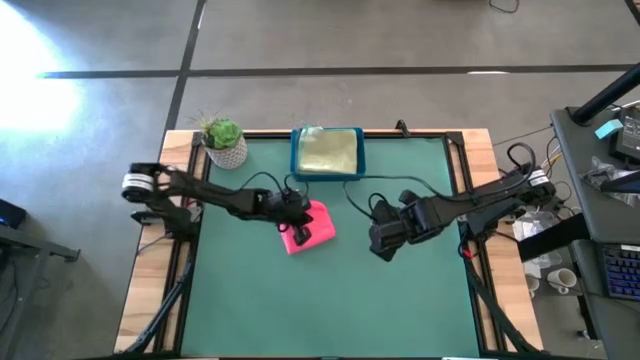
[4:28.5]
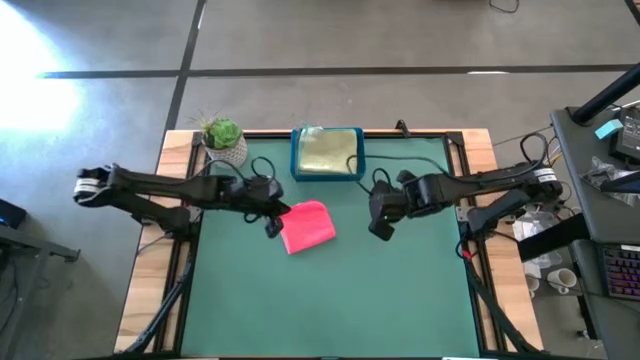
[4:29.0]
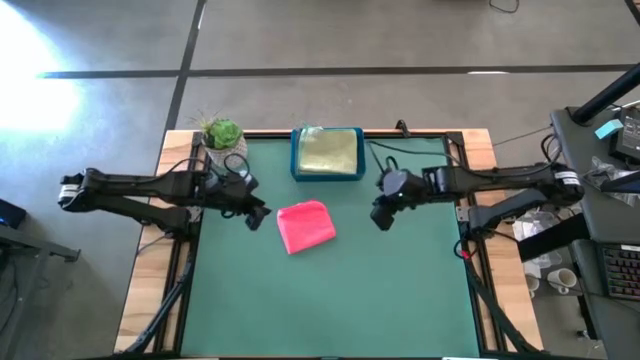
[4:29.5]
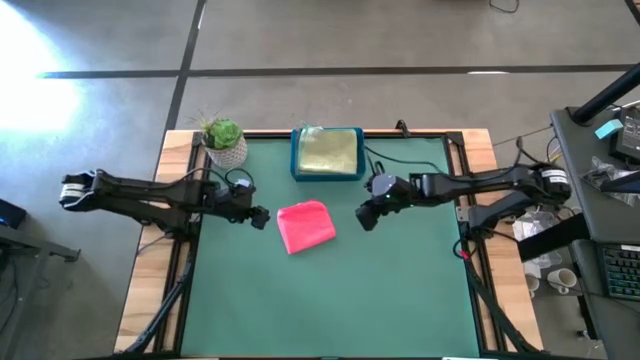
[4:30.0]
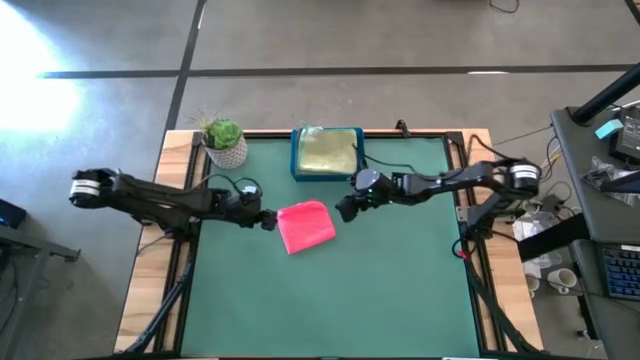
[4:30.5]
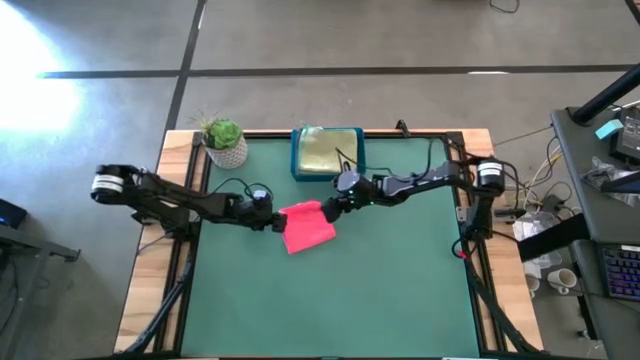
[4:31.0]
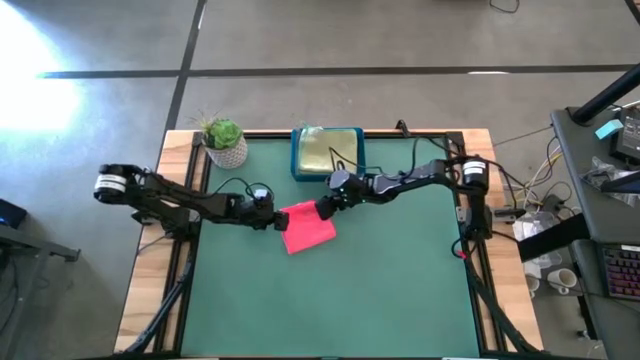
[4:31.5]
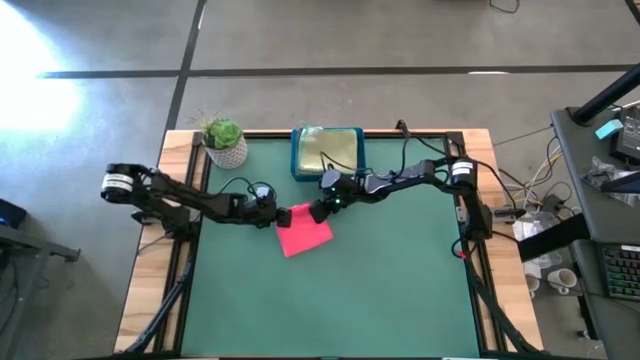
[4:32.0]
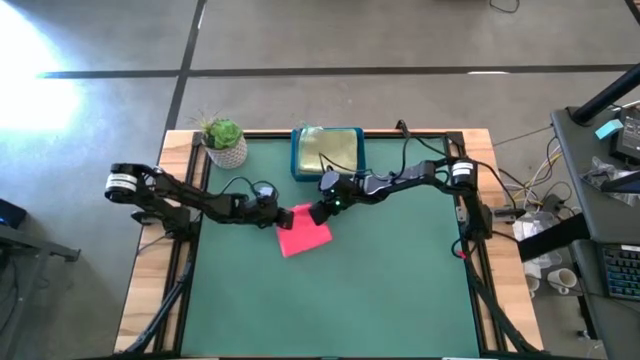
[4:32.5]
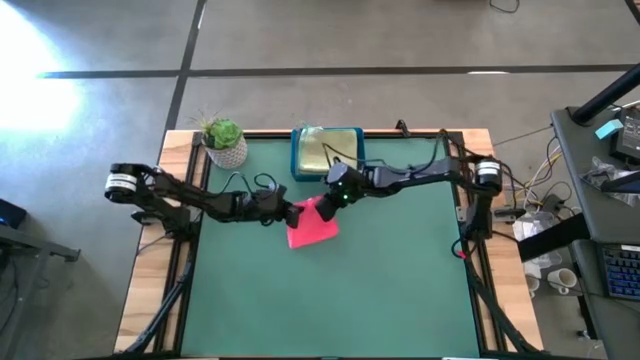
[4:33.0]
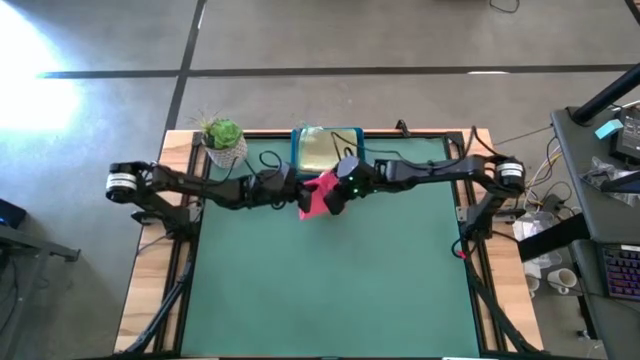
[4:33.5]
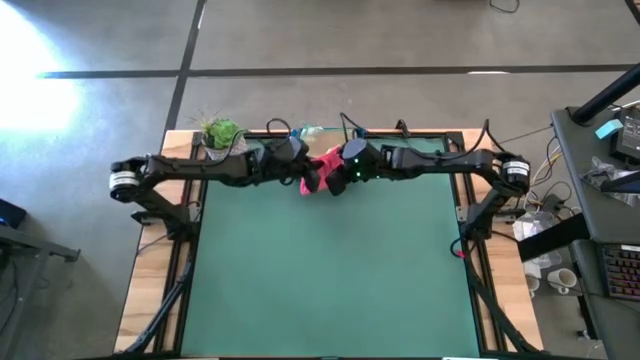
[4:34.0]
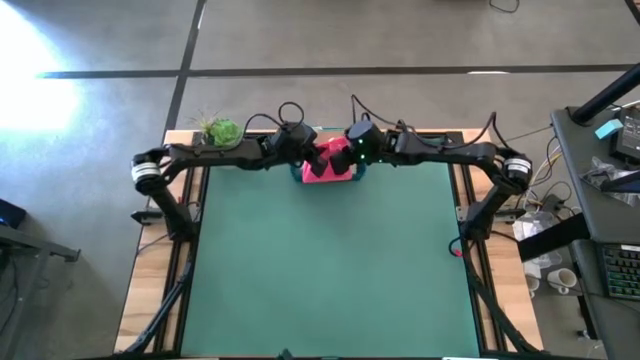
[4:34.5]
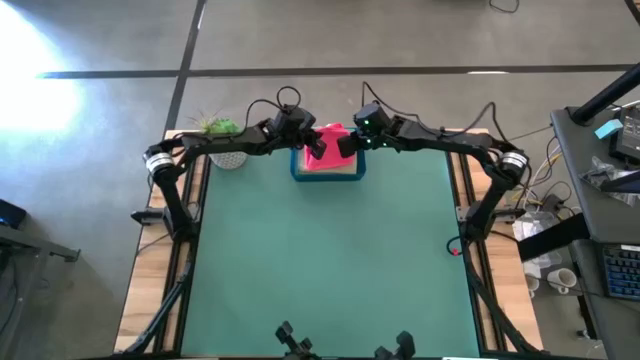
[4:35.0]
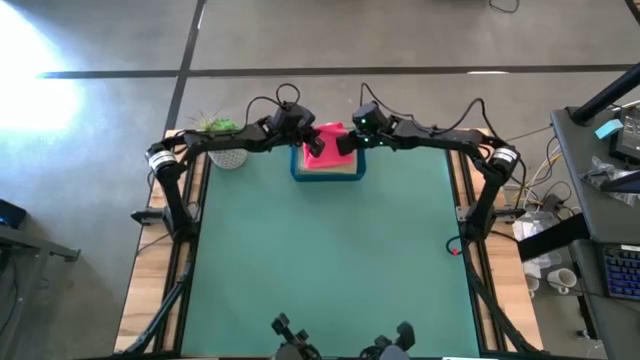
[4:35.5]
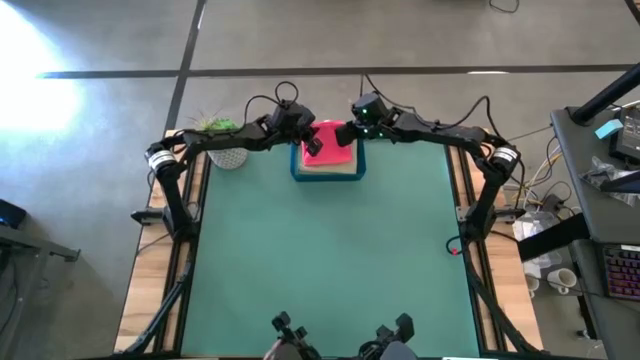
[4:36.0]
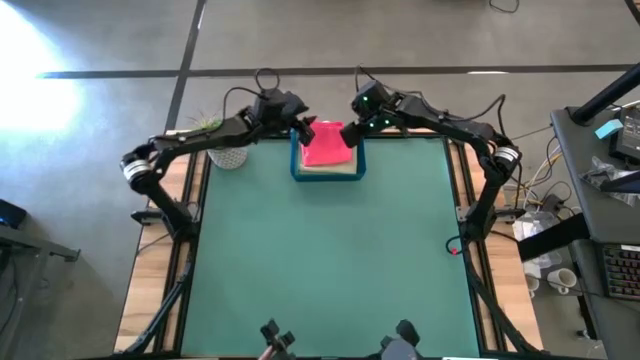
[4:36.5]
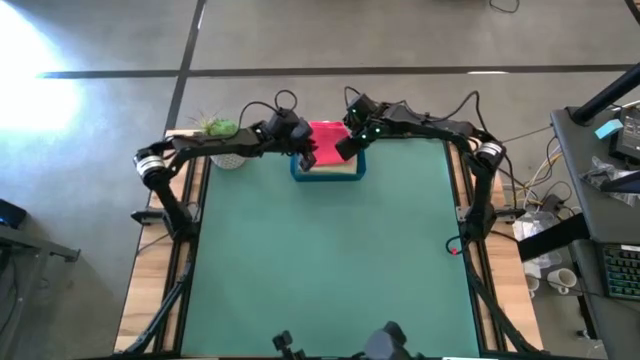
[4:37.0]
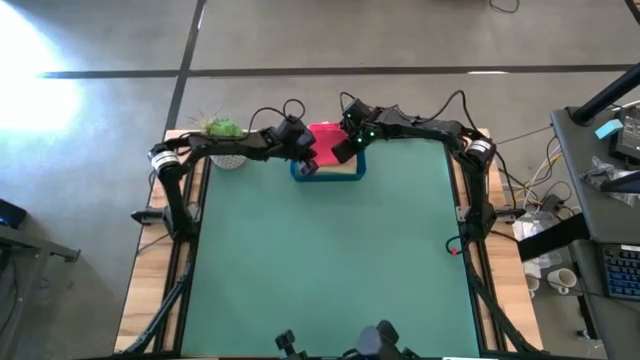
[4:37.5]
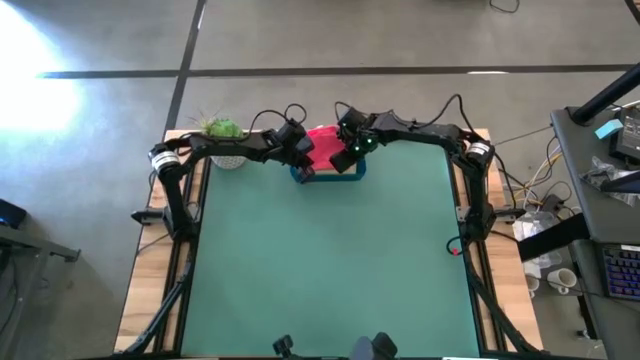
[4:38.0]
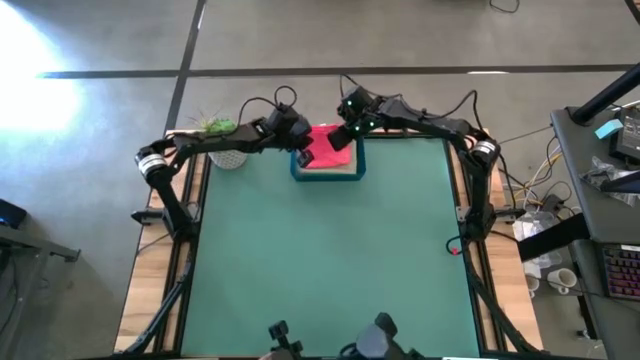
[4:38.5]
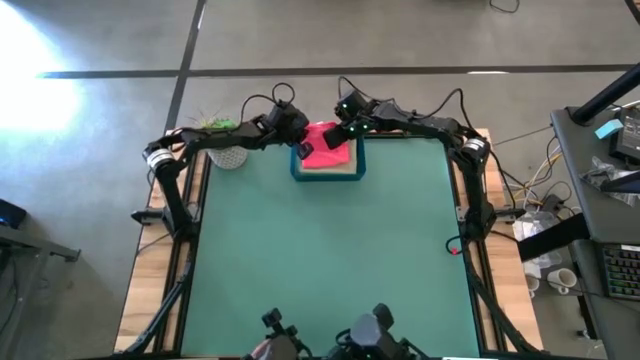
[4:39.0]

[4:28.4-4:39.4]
Task: Fold microfiber towels
Put the pink microfiber cloth into the blue bin

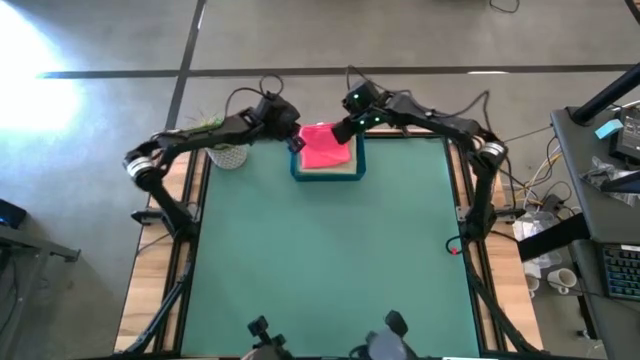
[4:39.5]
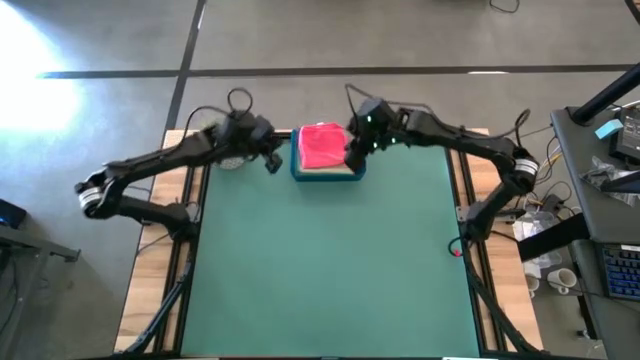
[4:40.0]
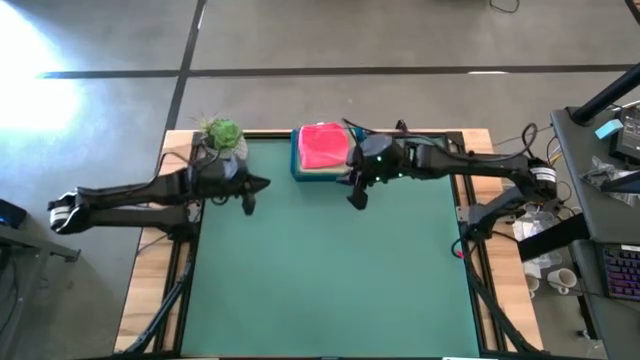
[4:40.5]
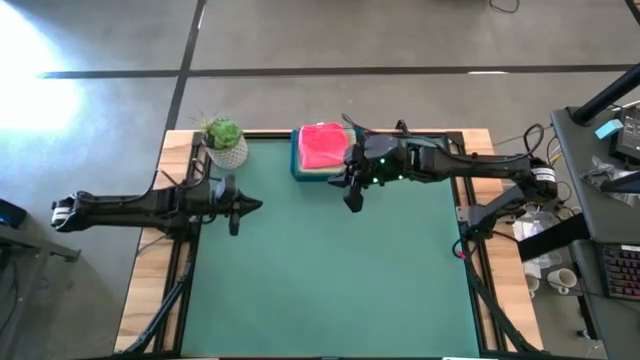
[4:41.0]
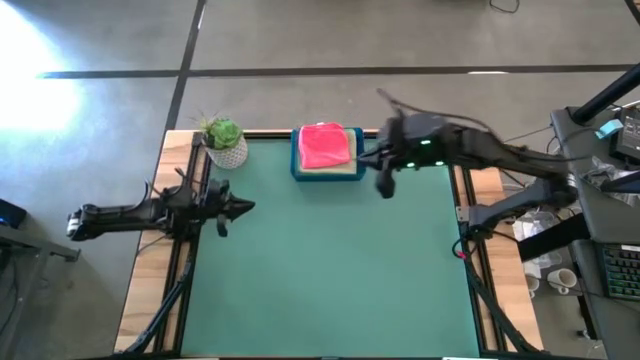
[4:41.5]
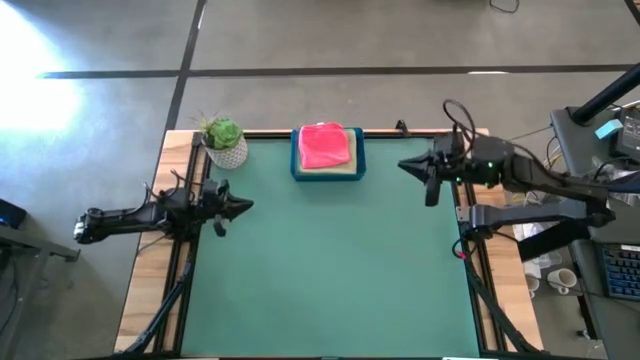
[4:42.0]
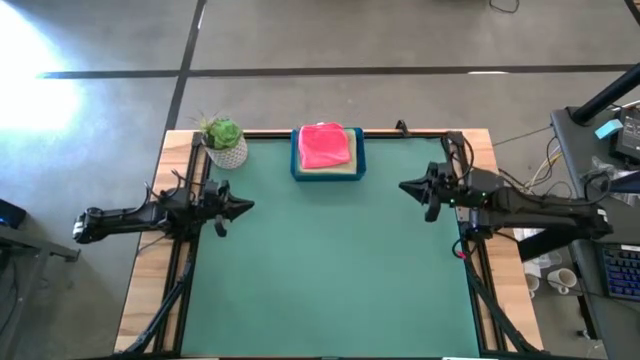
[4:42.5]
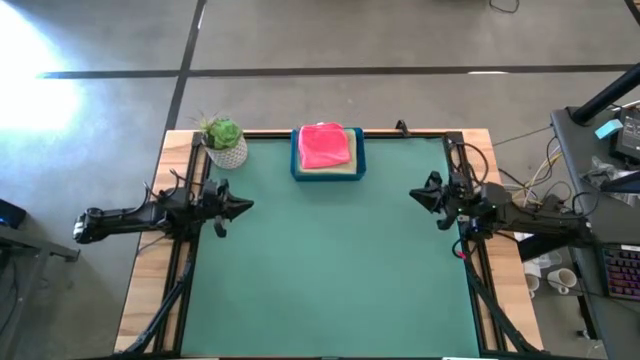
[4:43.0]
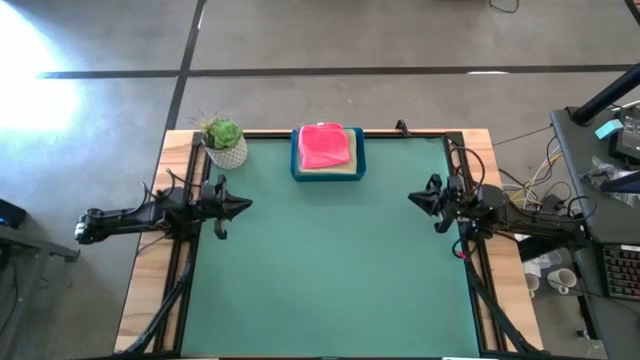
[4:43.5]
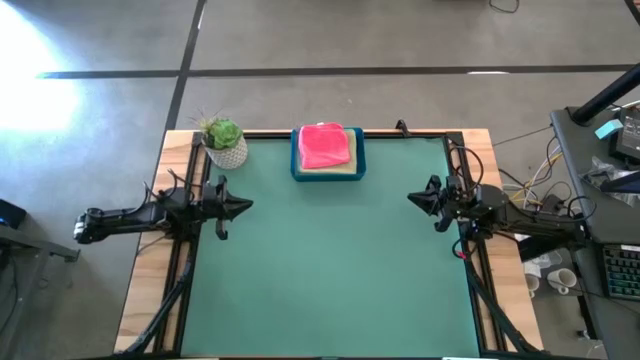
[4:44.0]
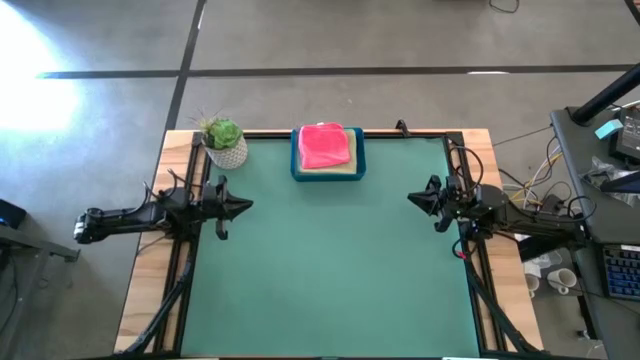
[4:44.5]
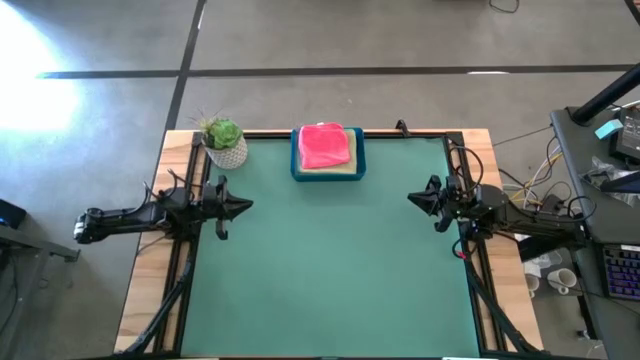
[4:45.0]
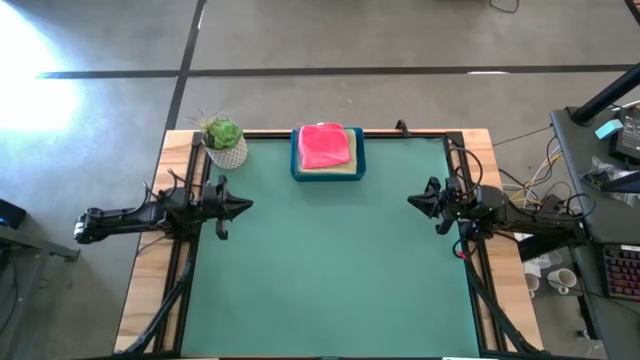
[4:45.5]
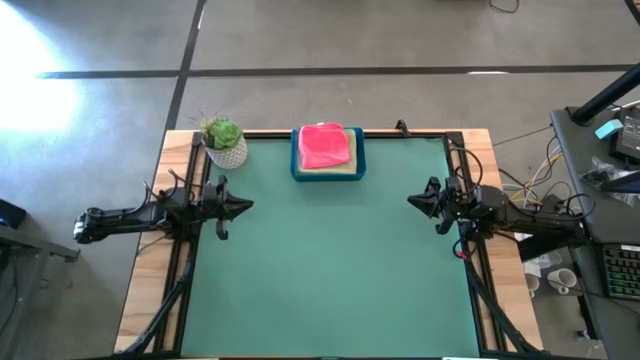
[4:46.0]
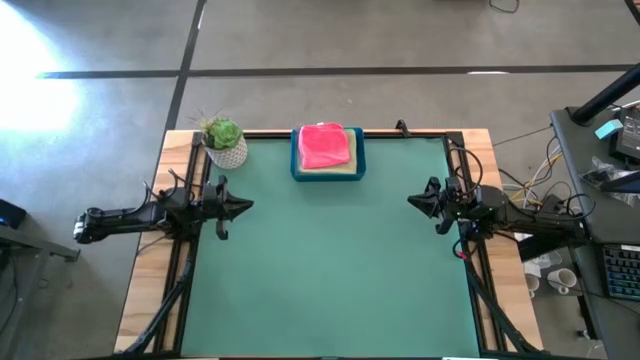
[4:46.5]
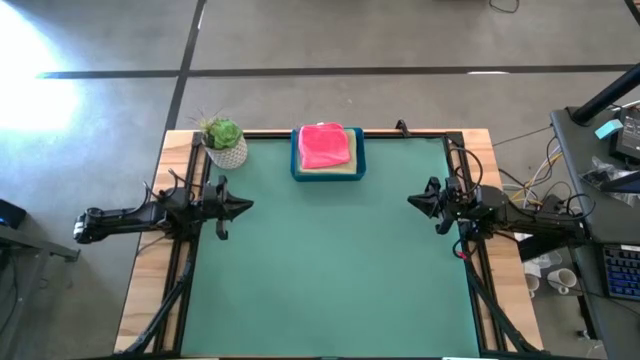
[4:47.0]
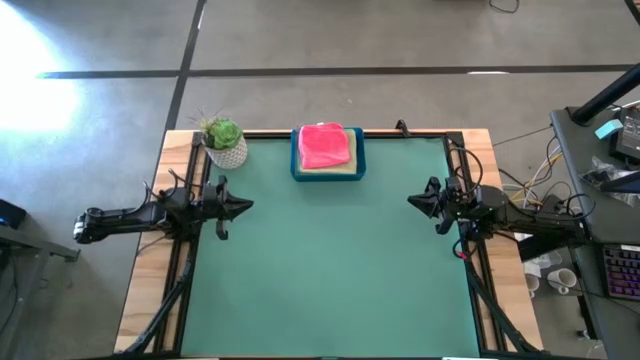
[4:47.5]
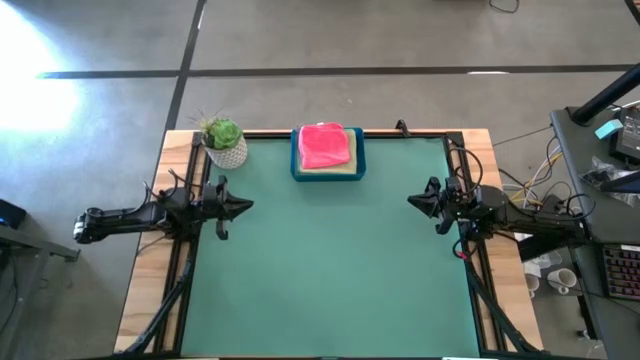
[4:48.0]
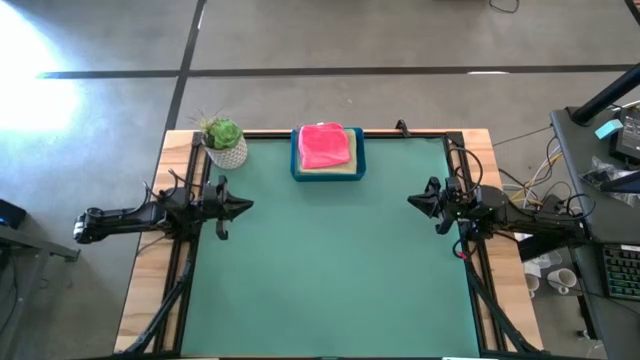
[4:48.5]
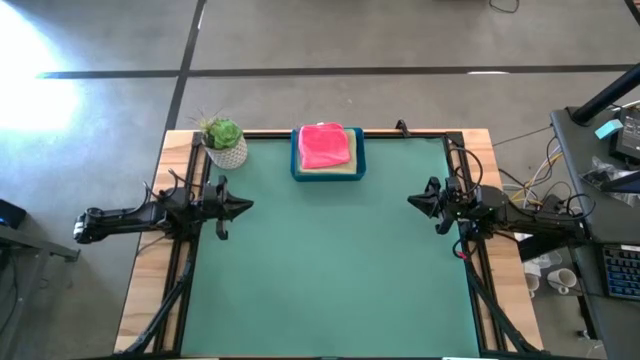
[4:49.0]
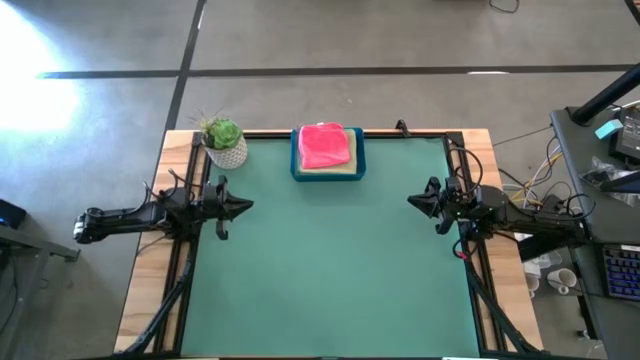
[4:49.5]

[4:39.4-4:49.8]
Return to Home Position
